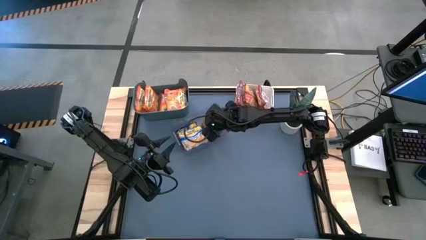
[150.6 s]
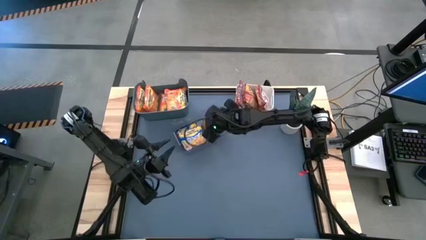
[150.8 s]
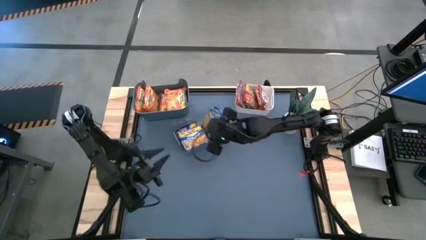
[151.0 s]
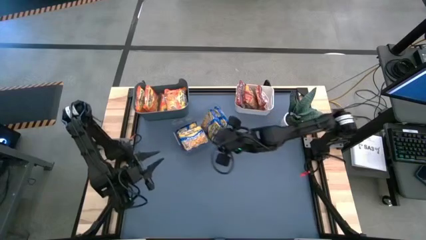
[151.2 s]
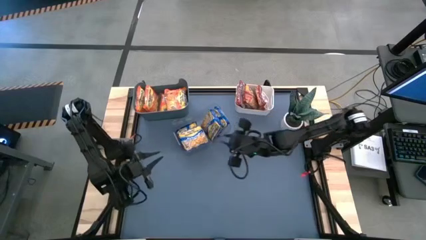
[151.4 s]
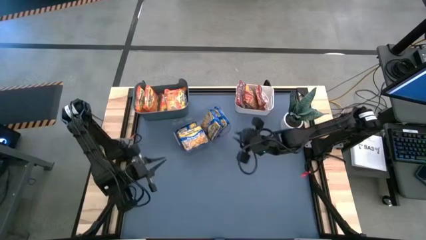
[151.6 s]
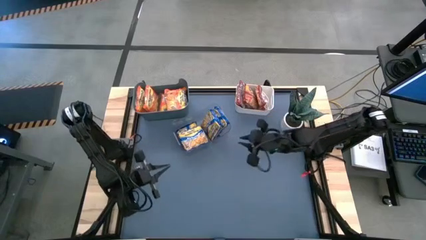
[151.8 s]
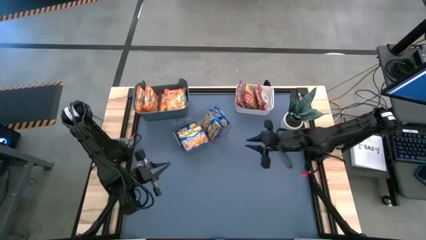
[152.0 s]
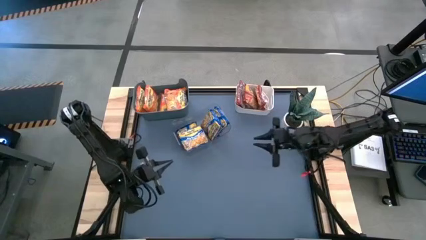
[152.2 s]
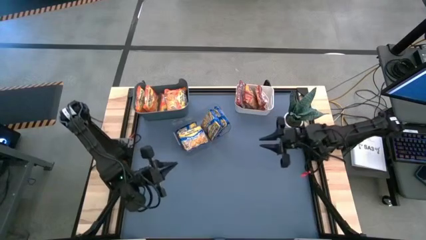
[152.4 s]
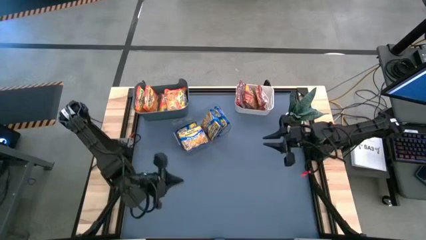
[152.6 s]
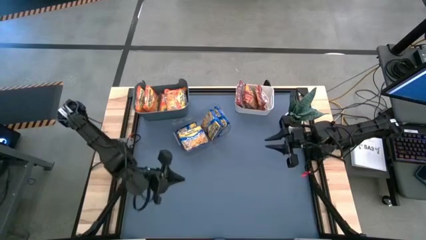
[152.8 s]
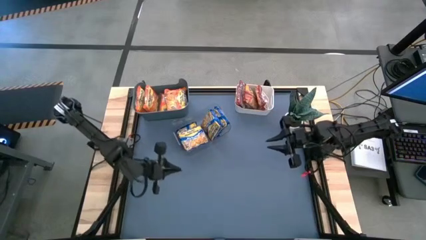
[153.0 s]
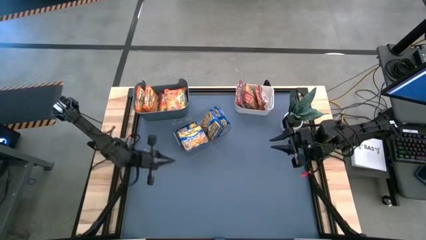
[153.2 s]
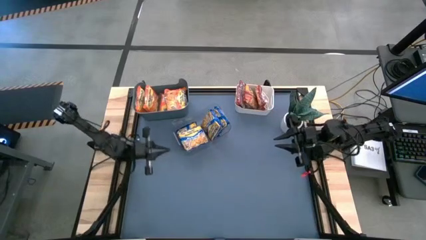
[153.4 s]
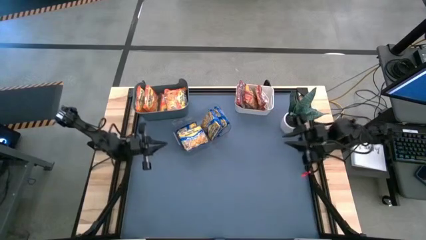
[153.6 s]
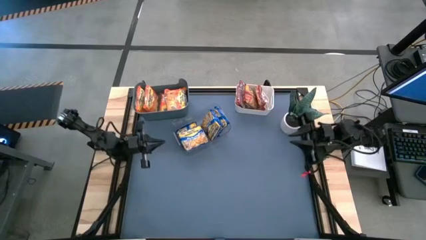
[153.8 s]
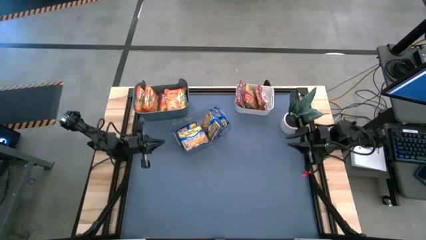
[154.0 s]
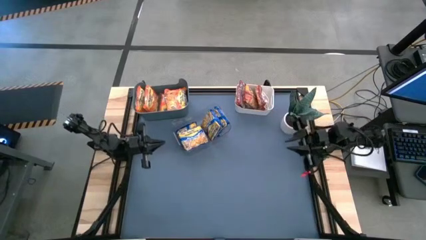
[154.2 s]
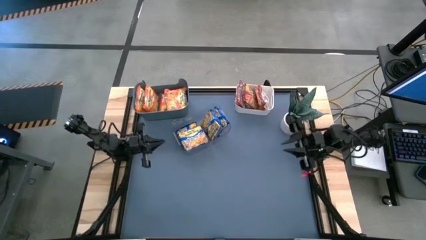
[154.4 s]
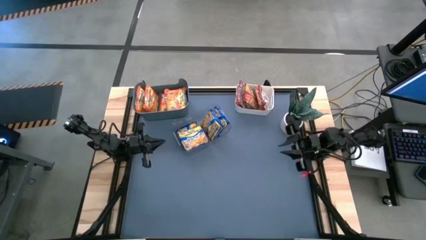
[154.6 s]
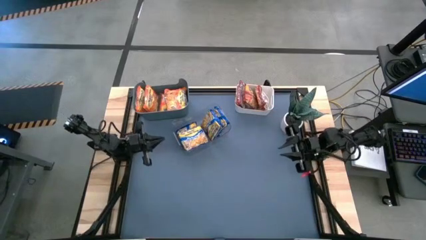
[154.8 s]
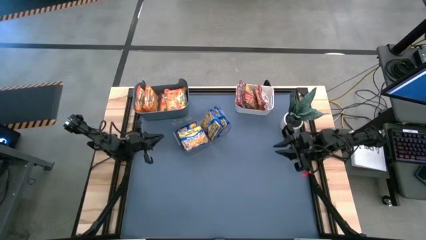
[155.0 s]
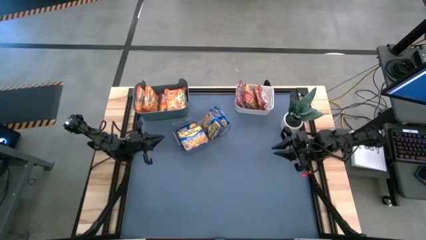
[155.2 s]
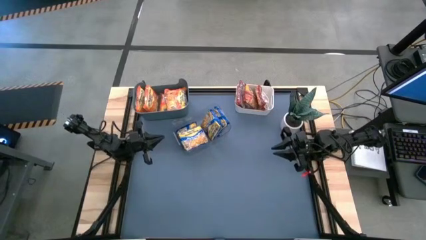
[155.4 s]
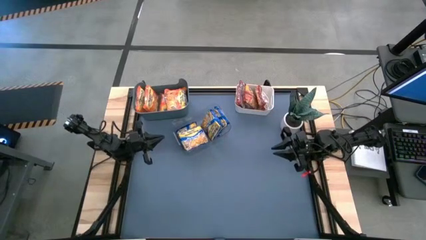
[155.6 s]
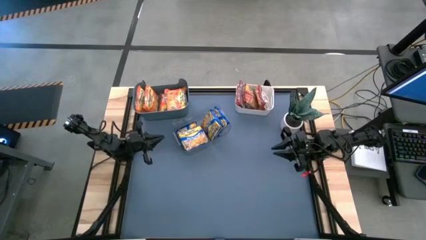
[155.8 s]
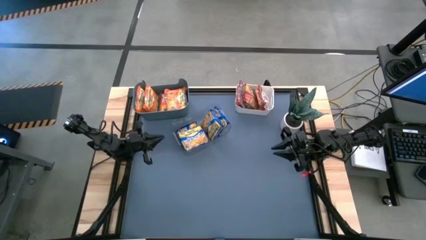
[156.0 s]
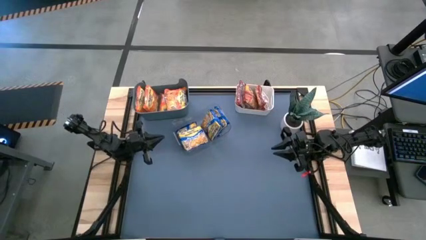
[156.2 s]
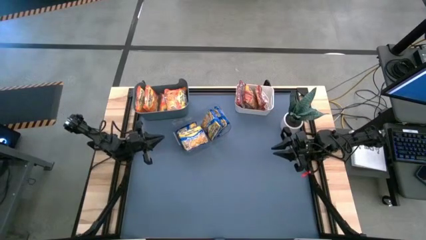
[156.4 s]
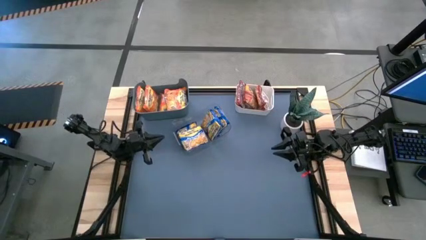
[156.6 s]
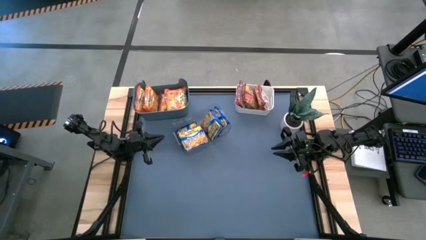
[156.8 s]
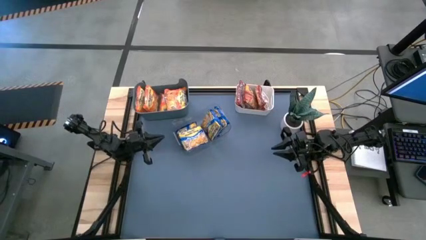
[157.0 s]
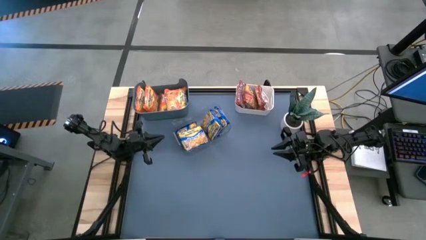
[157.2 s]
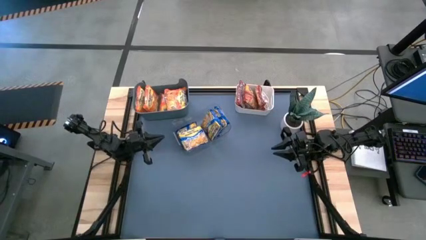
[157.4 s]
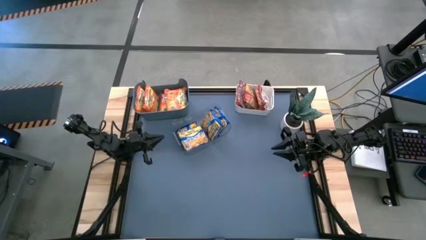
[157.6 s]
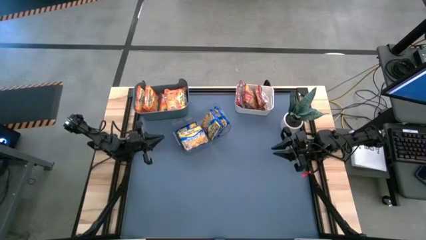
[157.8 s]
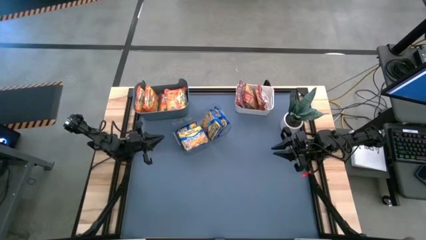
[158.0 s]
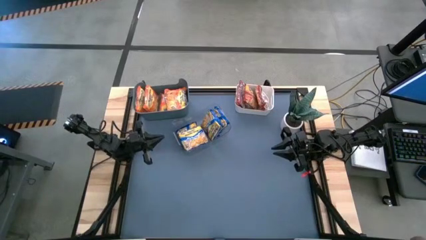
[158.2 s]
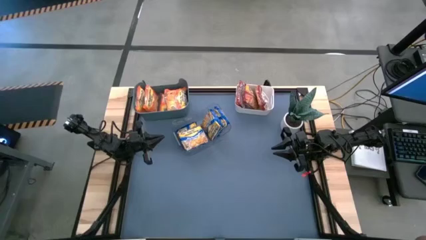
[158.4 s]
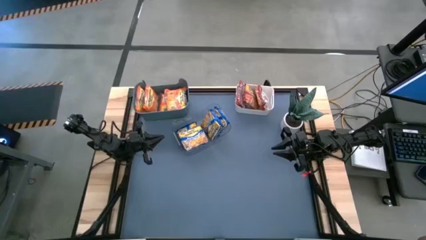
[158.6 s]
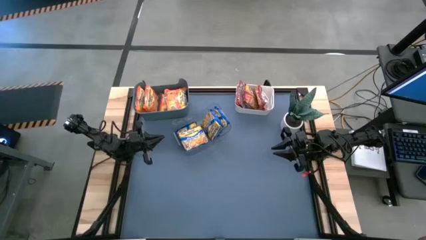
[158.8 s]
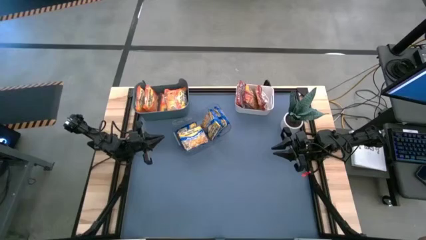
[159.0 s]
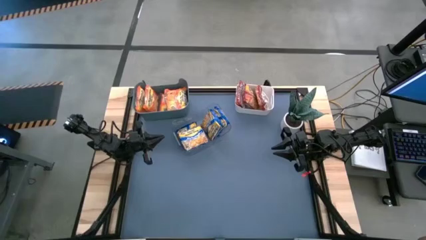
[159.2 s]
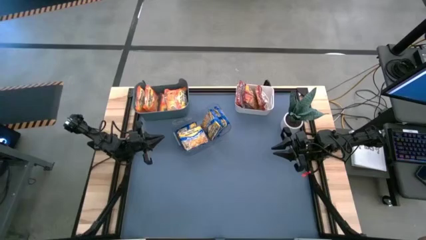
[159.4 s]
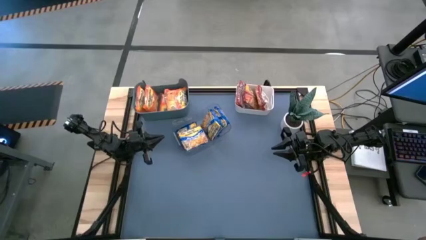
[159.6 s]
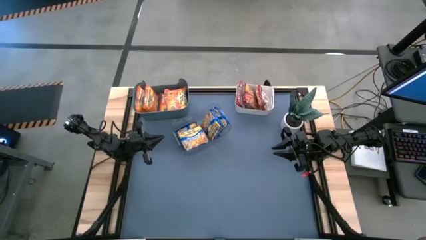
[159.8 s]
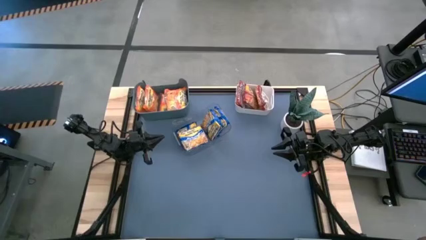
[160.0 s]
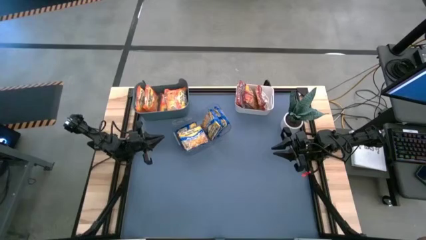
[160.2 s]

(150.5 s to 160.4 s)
Task: Sort Maruchan noodles
Return to Home Position

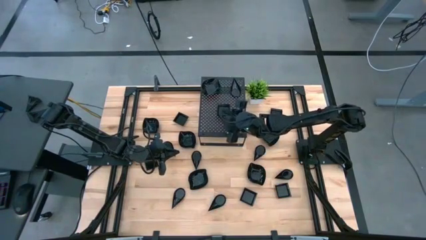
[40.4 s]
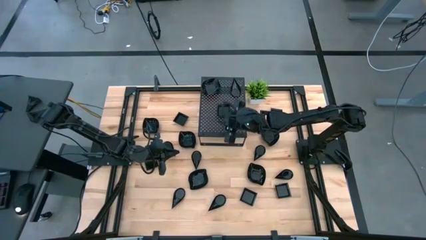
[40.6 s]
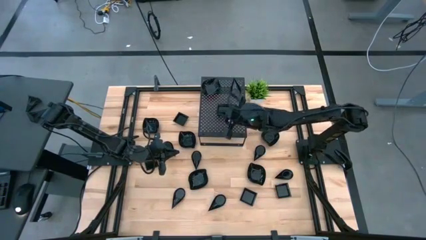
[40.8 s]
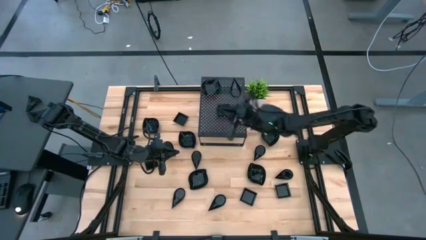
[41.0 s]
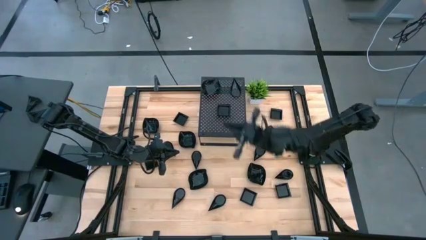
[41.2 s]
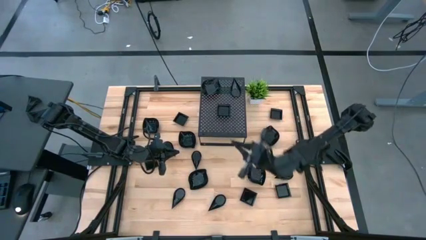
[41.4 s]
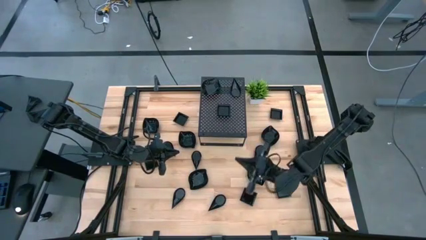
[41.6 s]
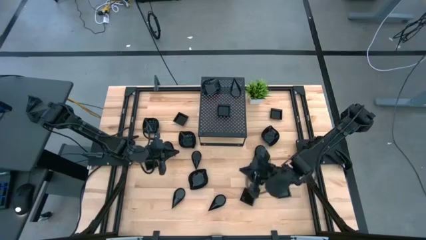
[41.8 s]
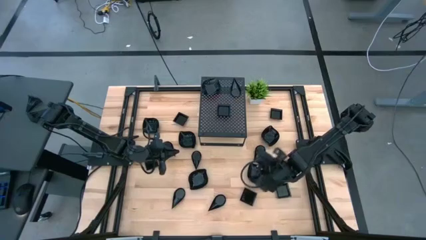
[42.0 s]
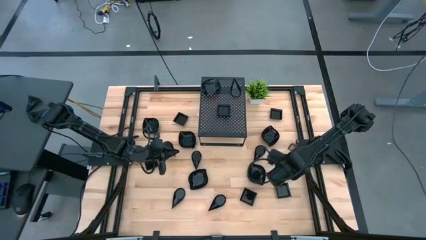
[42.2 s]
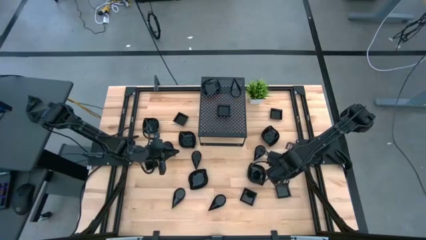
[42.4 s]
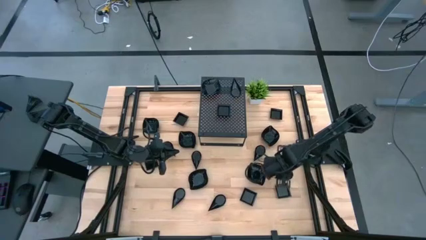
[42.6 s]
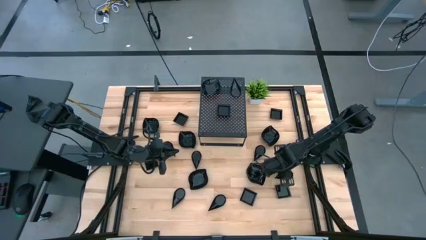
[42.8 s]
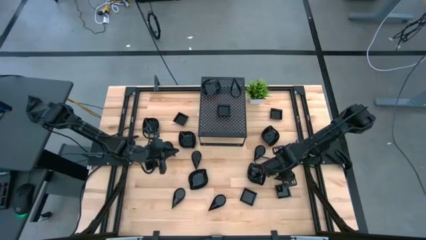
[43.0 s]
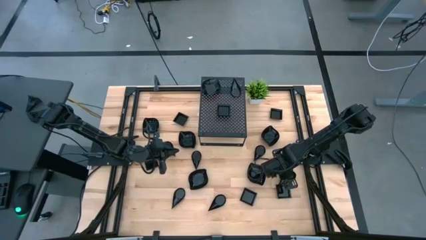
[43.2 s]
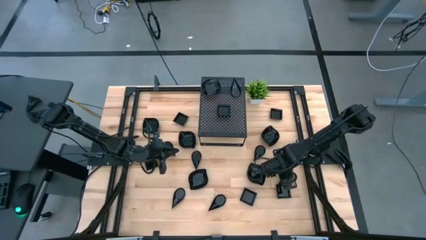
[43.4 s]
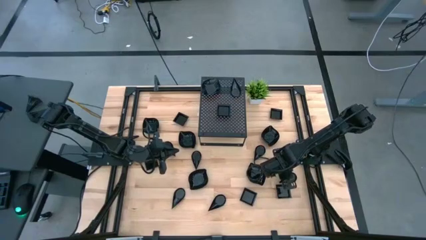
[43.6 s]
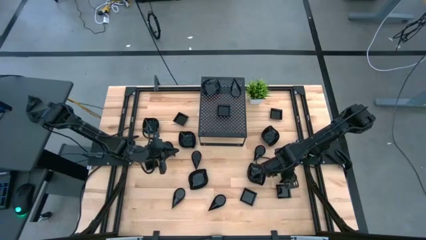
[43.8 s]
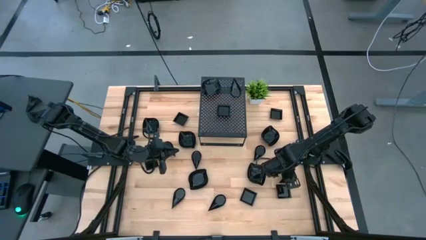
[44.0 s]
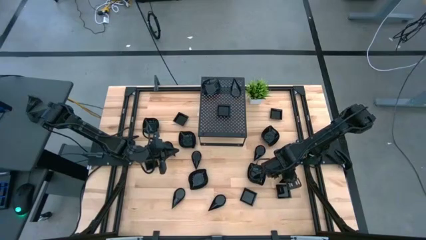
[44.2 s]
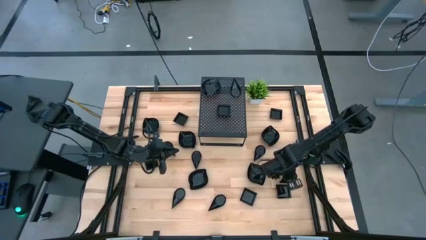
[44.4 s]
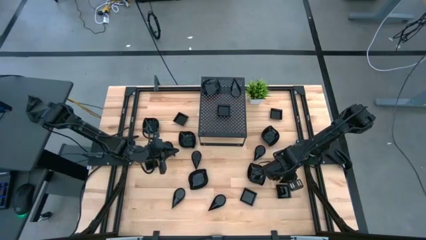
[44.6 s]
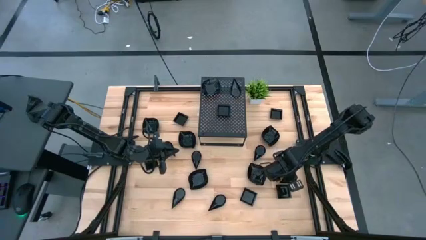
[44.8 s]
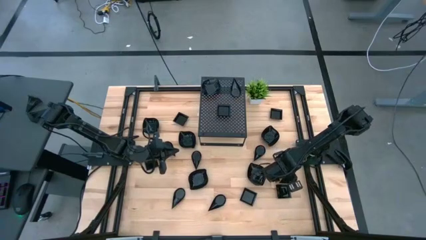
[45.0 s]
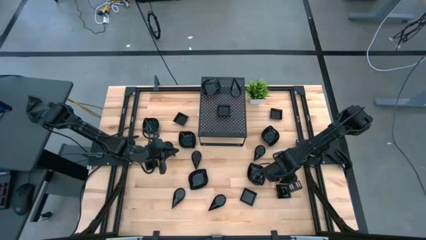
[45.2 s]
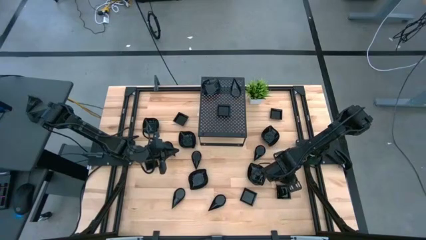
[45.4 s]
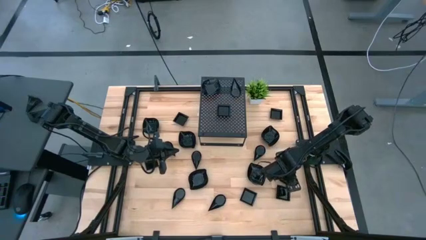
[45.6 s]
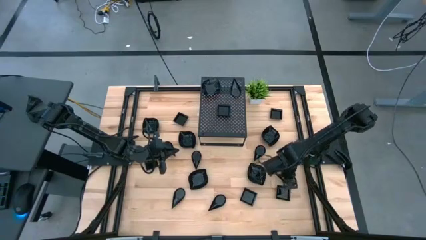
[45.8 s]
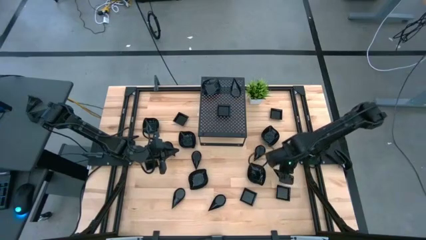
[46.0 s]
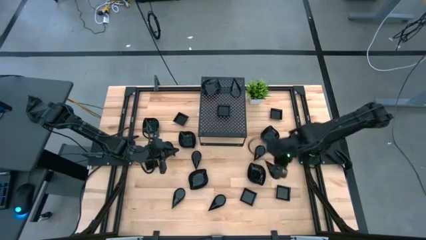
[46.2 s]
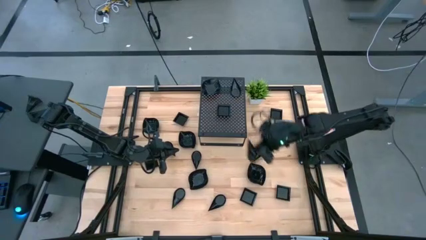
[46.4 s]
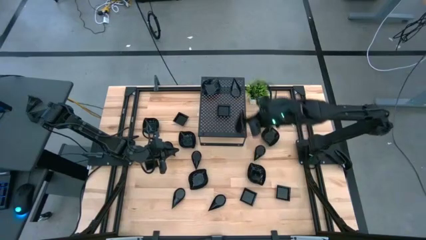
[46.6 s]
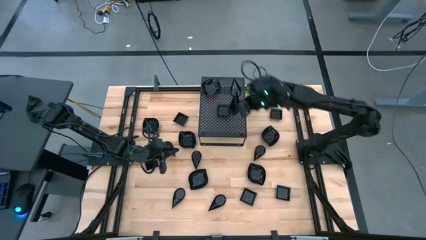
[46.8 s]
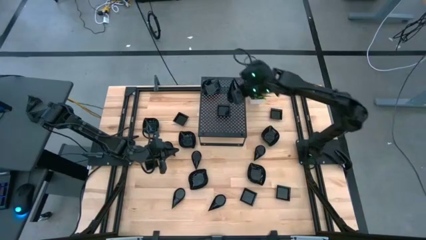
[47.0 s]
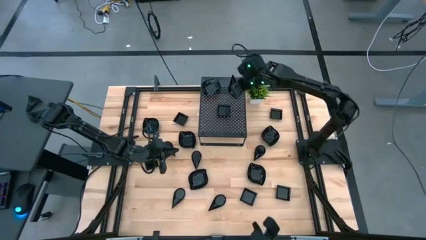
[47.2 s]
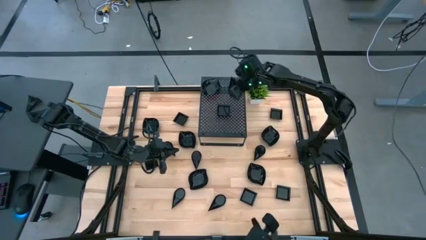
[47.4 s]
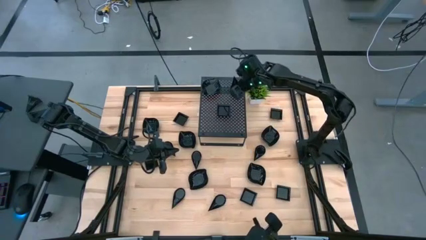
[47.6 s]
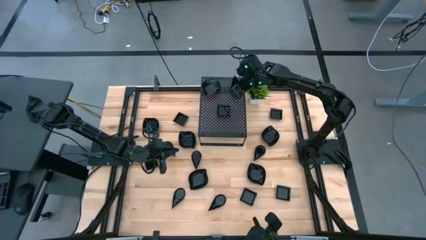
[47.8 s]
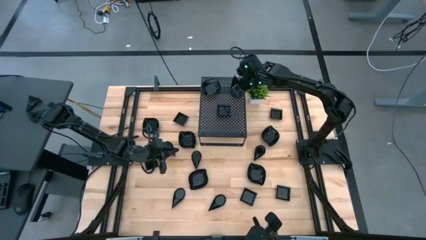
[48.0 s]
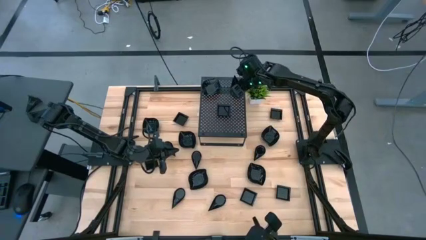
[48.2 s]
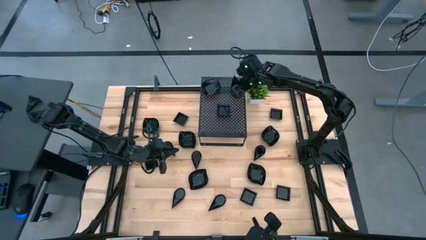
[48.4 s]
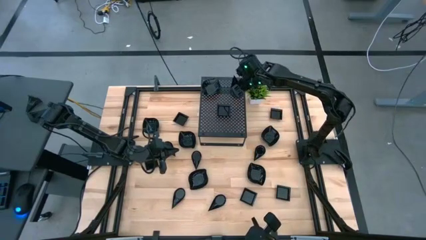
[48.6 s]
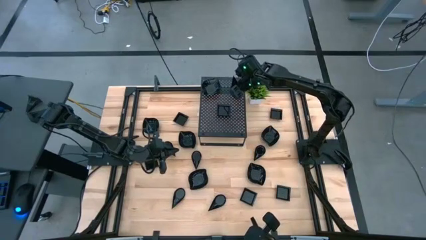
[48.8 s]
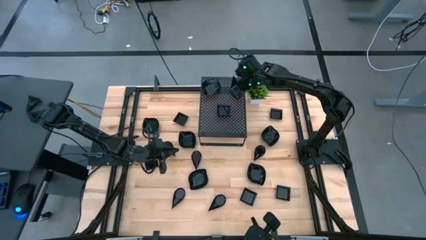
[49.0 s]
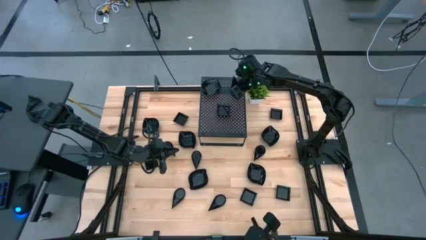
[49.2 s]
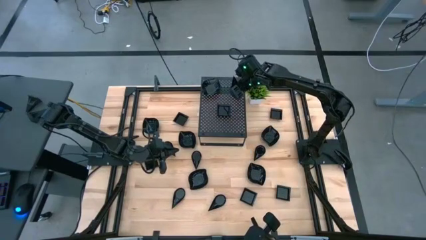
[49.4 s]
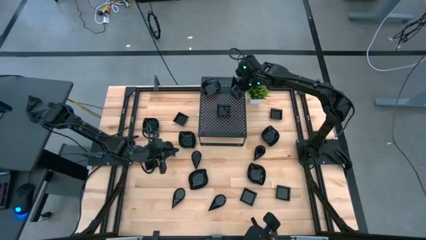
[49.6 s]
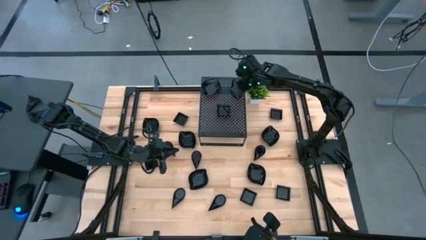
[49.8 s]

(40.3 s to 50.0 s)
Task: Pick & Place Mini shaped plates
Stack the black drop-shaped plate on top of the black drop-shaped plate on the shelf
